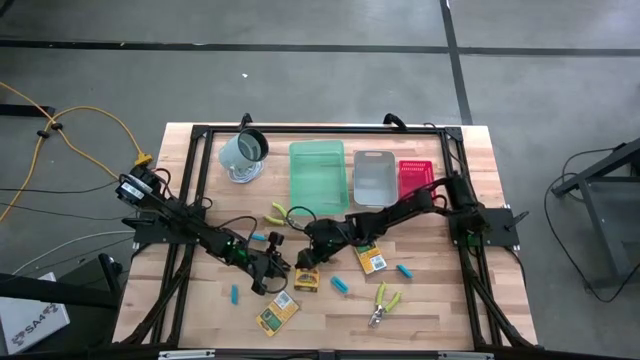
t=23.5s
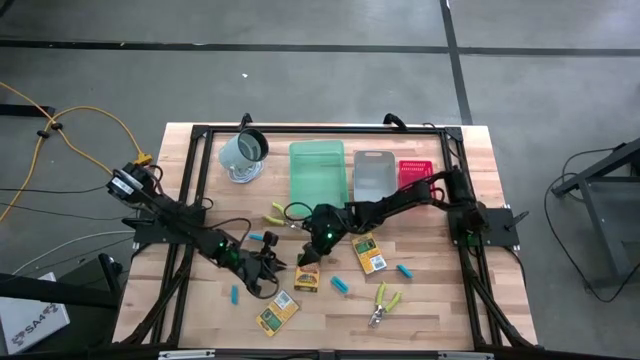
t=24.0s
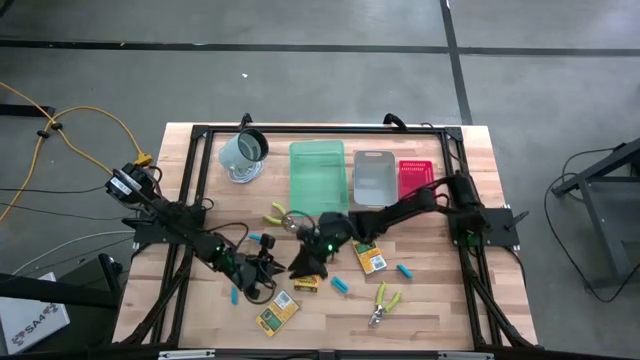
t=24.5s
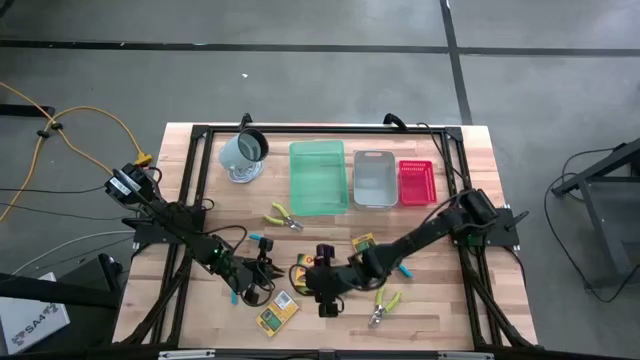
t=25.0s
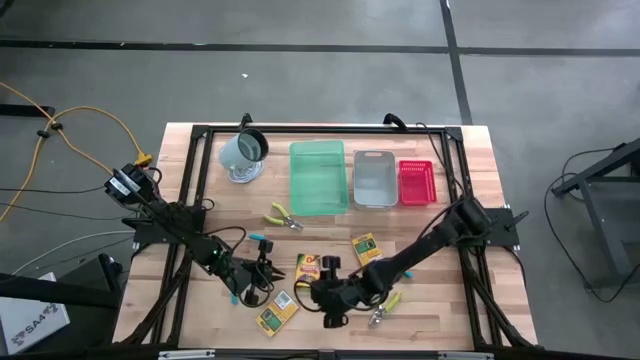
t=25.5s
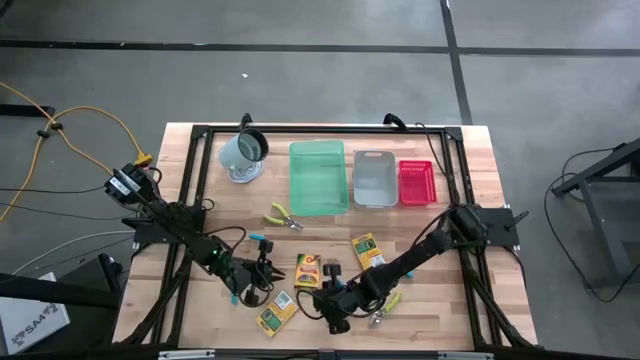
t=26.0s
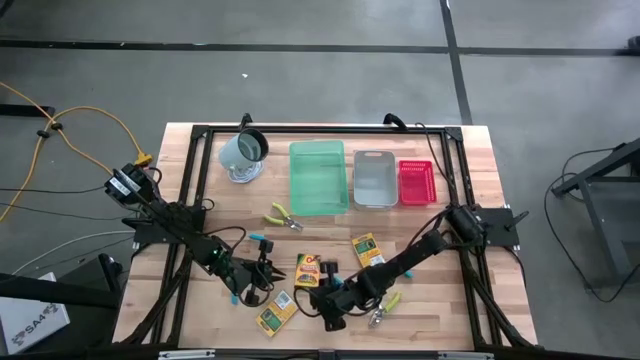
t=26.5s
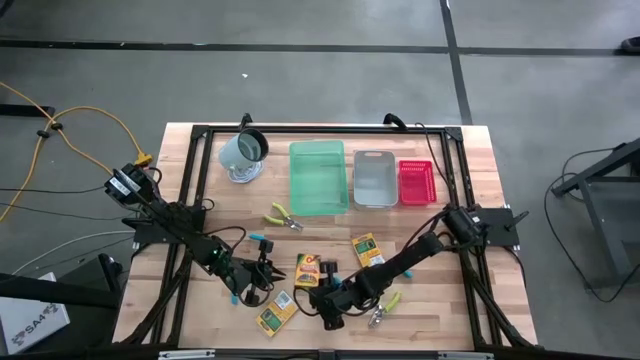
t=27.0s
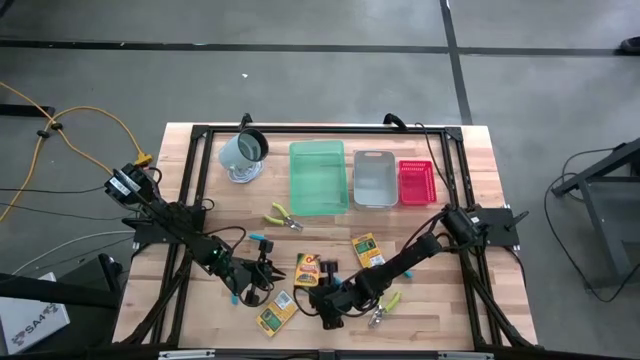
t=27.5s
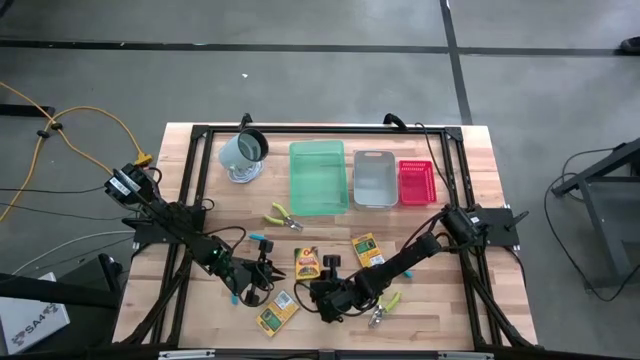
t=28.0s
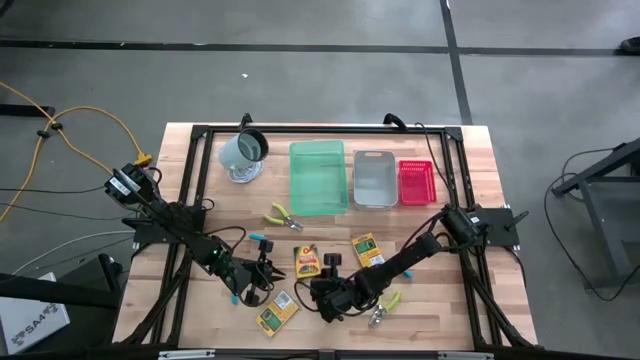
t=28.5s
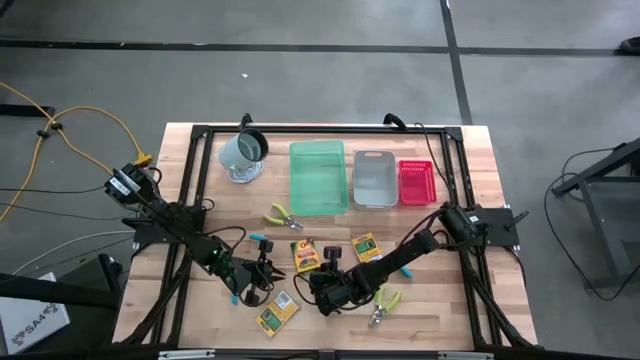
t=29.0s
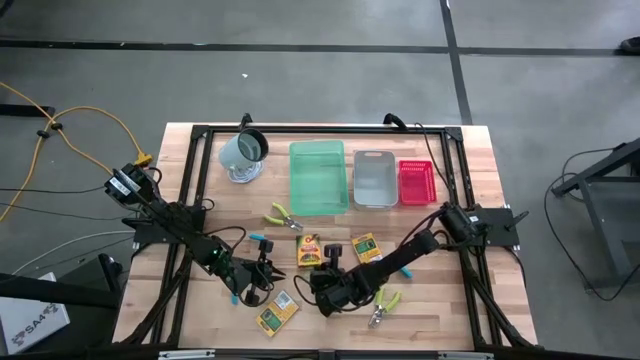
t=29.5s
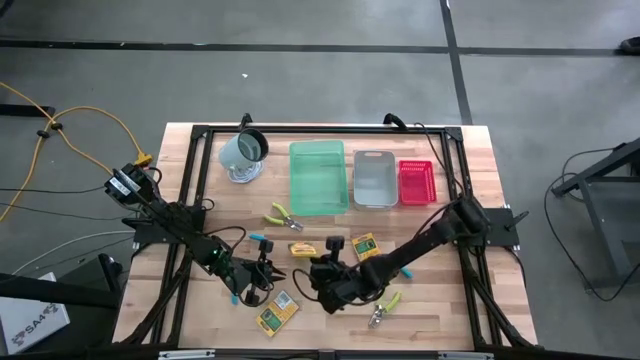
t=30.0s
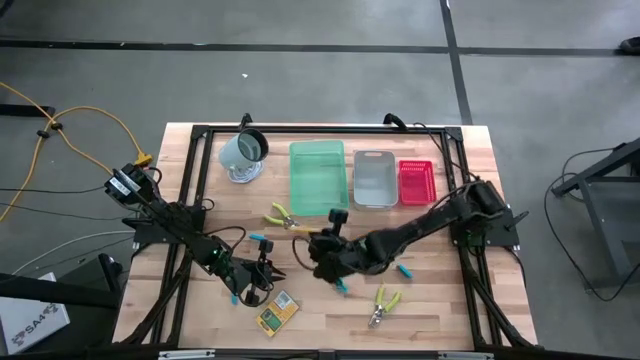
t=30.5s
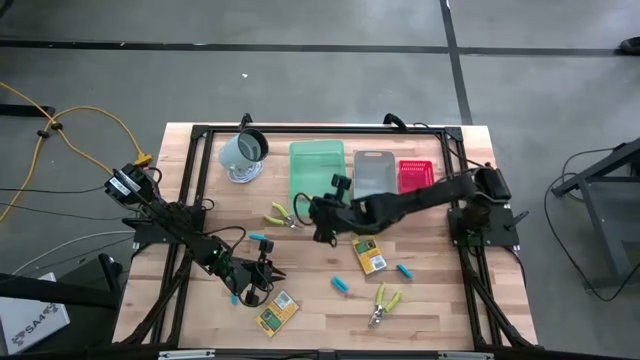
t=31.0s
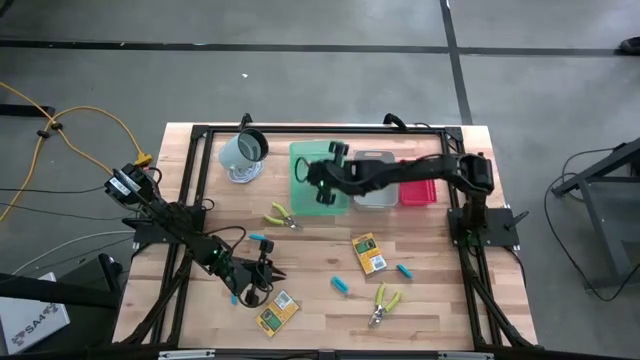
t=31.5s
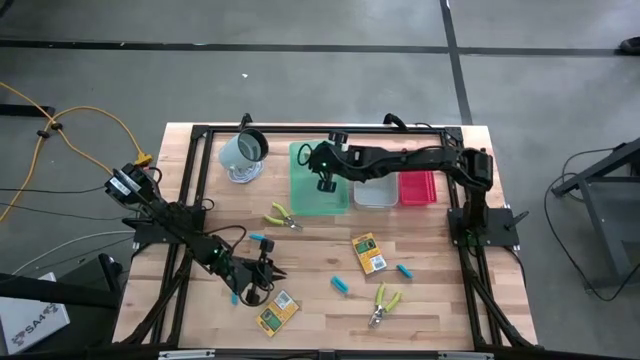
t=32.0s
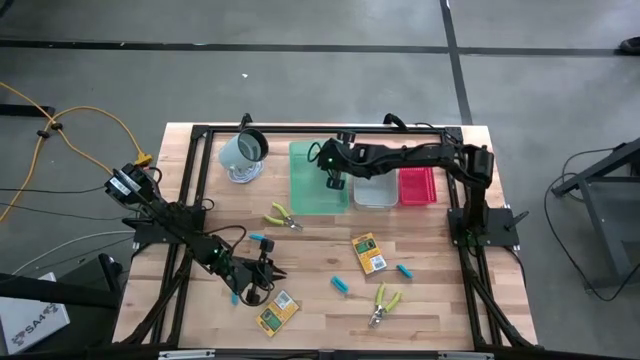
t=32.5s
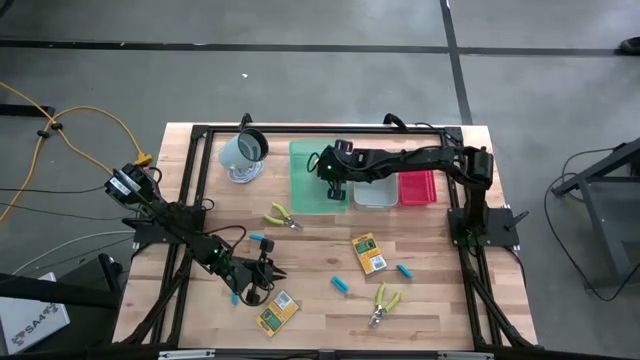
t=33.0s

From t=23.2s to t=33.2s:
Task: Pick & Place School Supplies
Put the top left yellow crayon box into the green bin

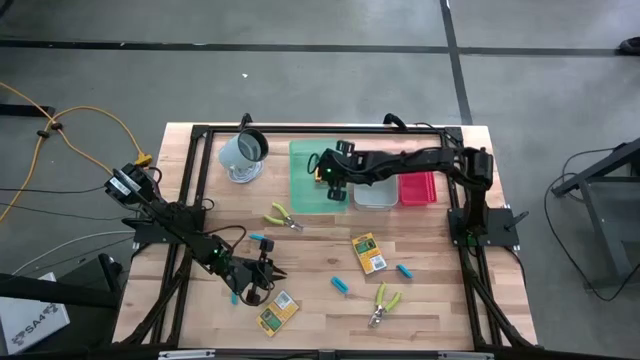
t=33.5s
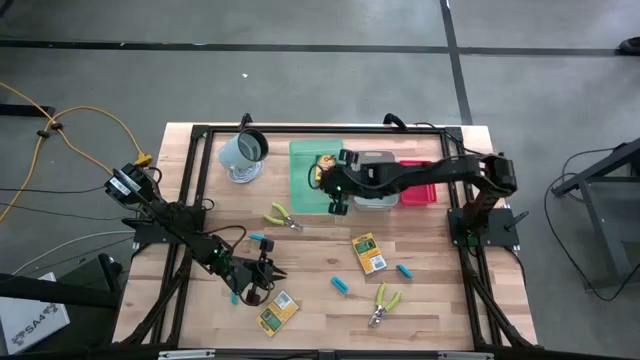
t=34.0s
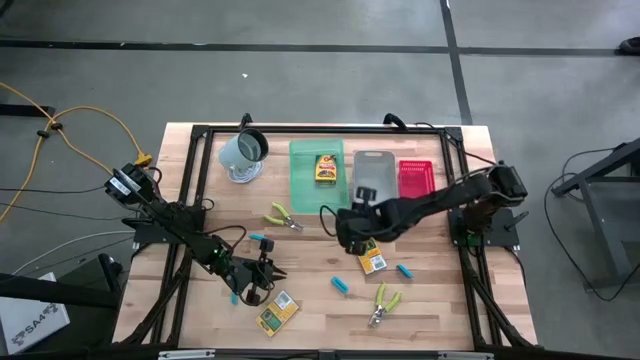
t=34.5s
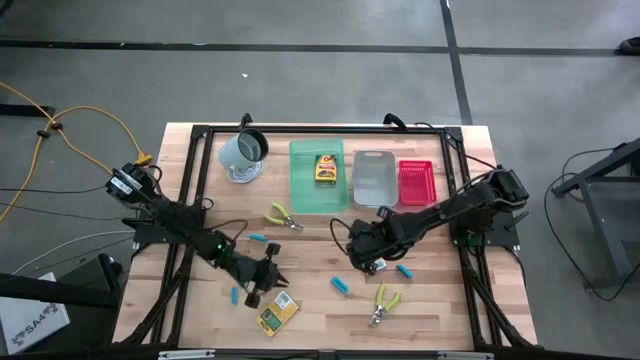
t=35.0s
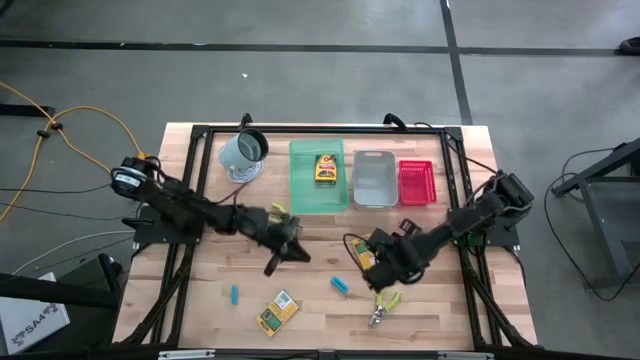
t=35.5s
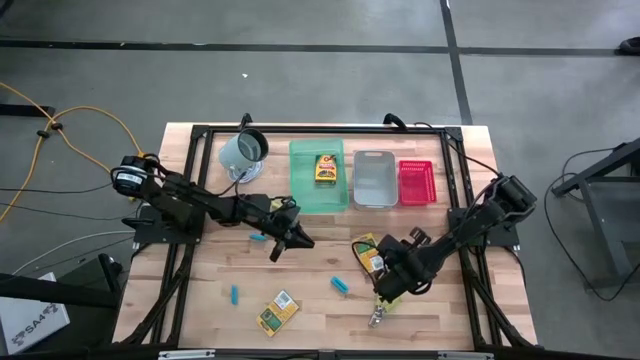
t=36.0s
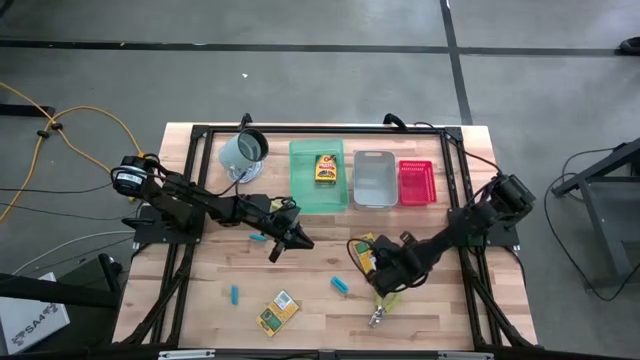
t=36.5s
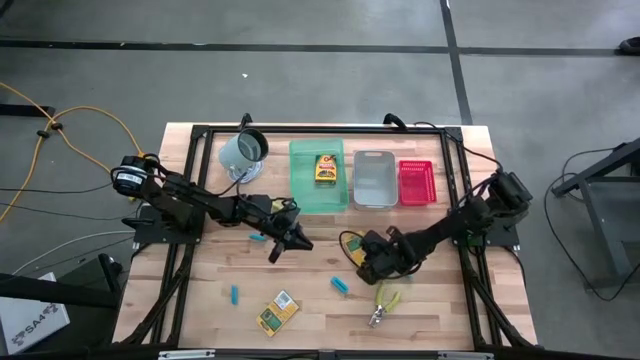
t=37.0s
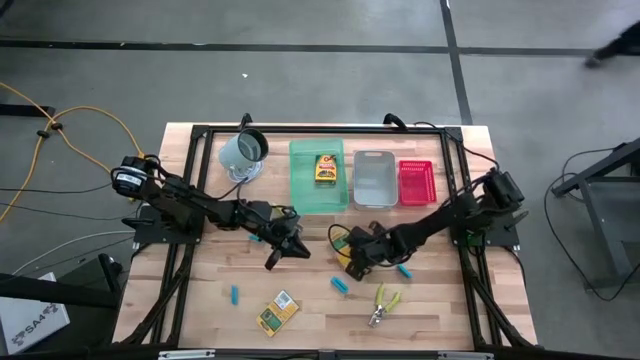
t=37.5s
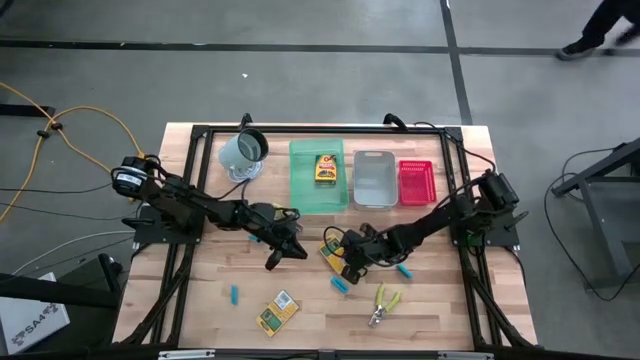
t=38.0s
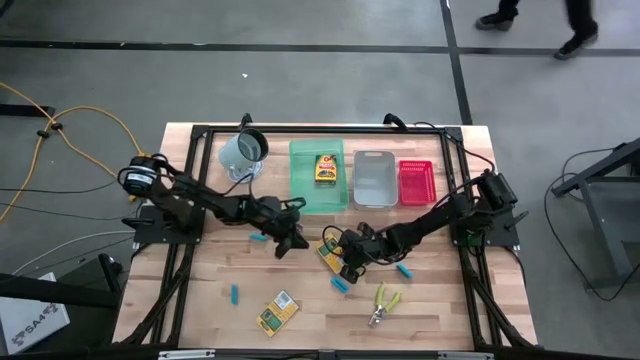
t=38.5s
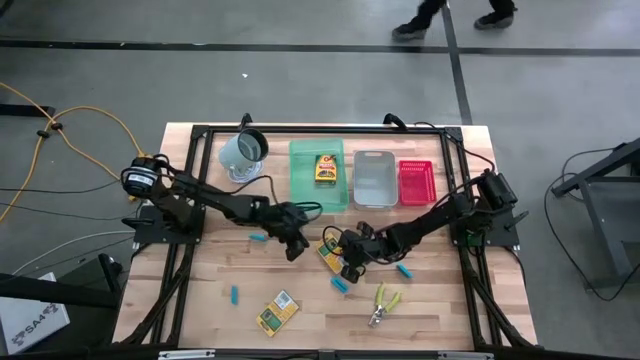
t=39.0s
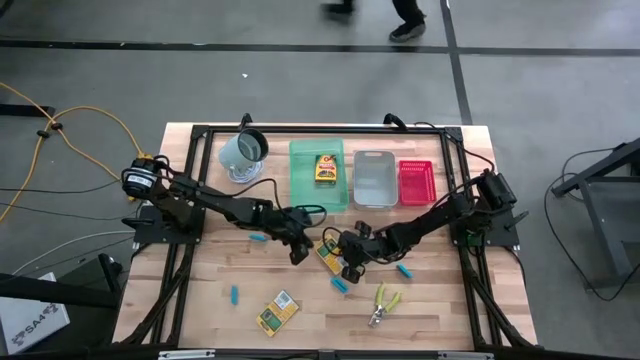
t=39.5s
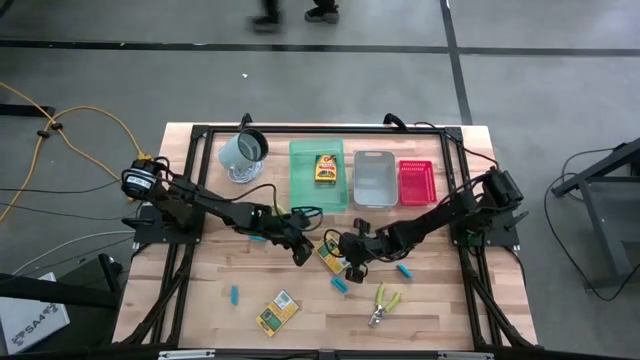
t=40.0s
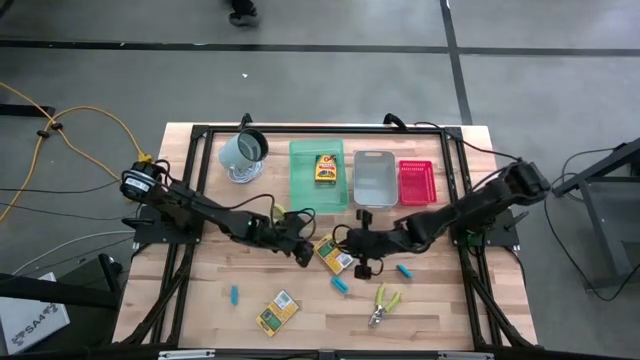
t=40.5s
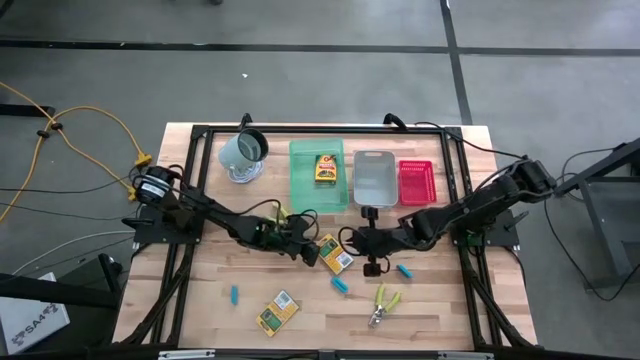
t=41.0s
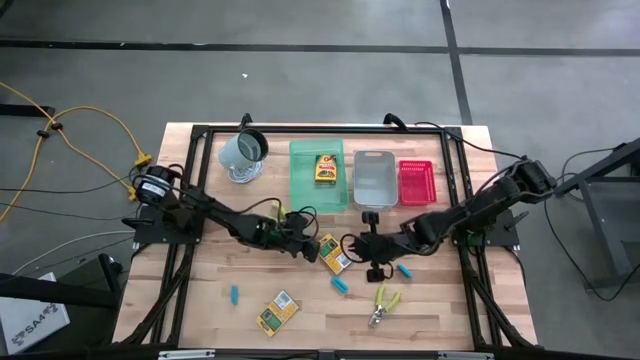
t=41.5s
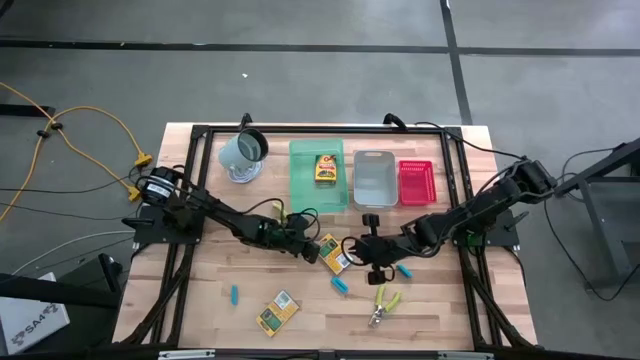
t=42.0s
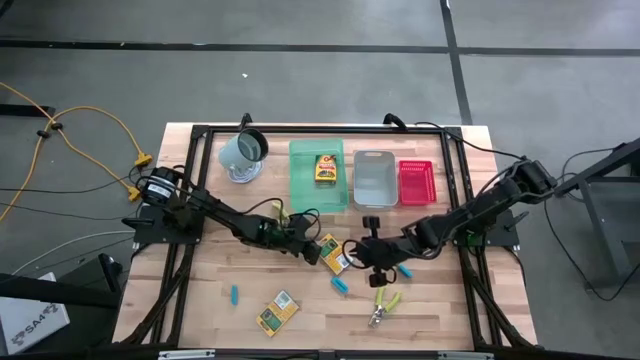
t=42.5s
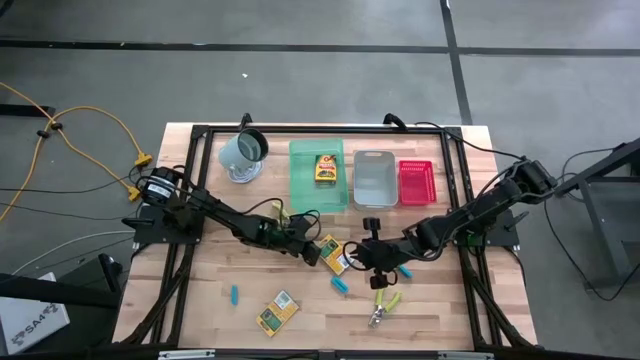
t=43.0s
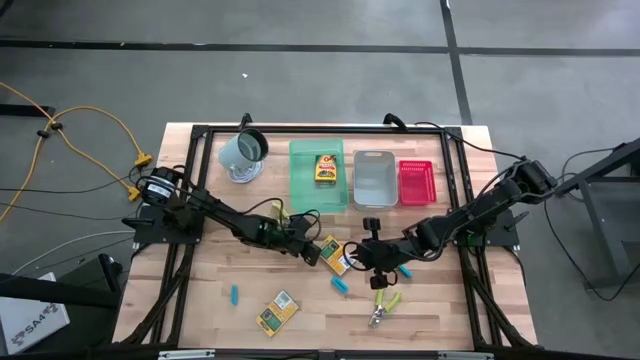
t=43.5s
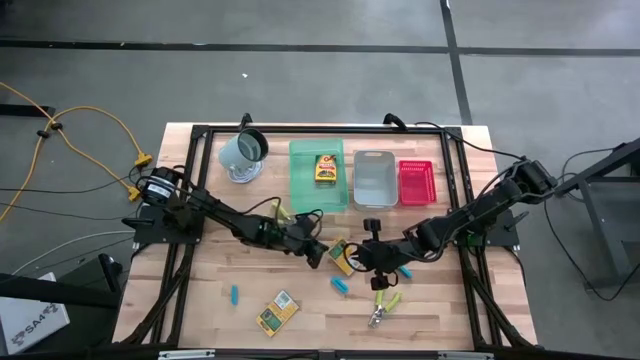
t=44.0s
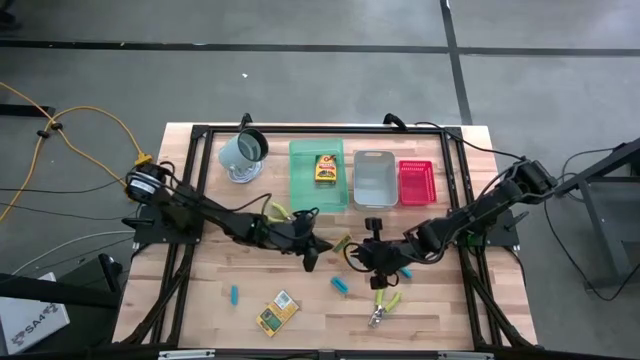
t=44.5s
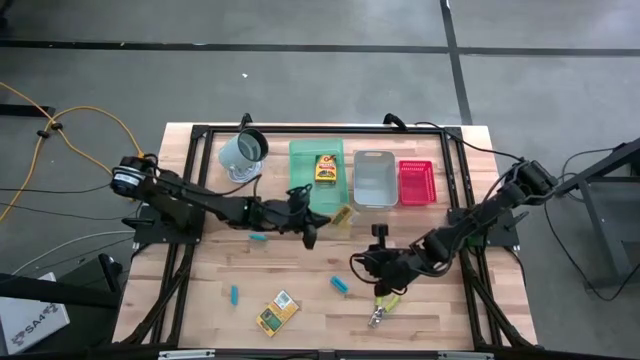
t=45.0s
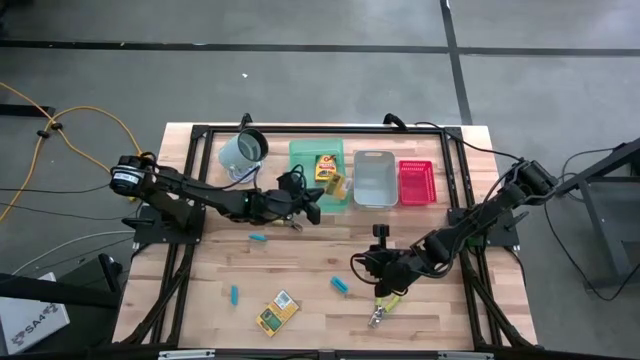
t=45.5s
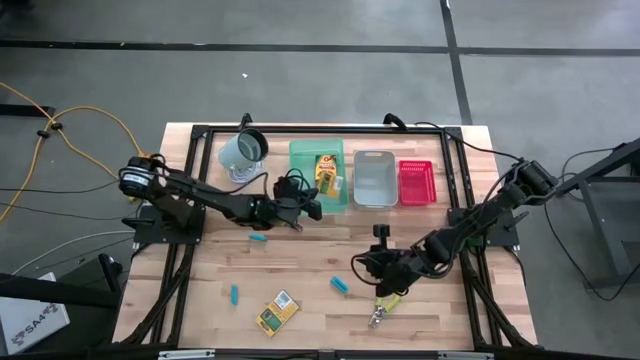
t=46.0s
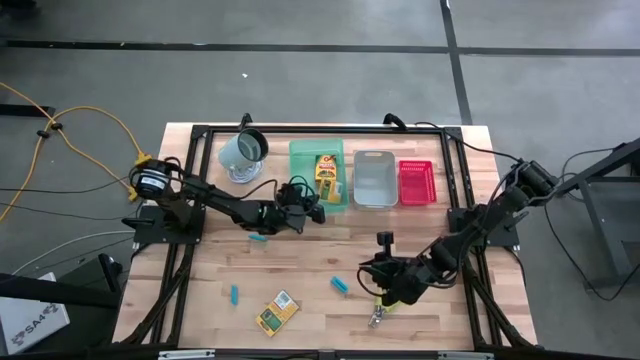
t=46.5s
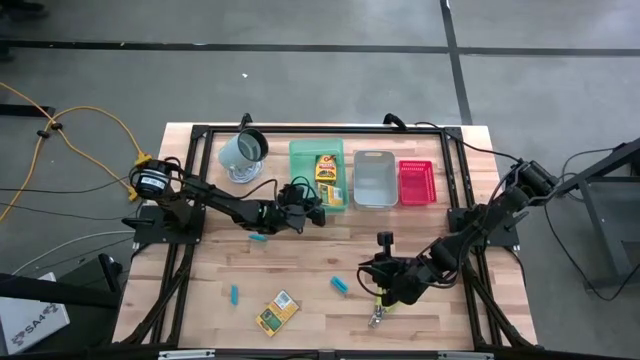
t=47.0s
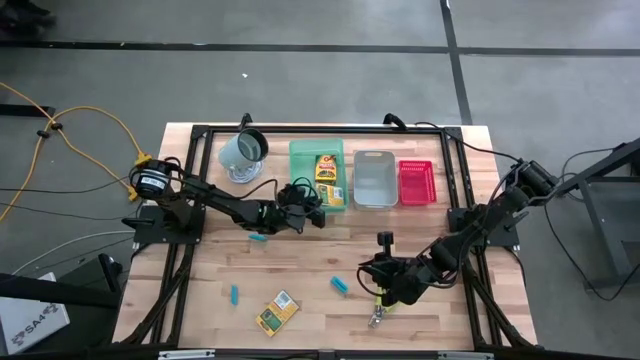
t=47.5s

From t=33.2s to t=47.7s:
Put the right yellow crayon box into the green bin
